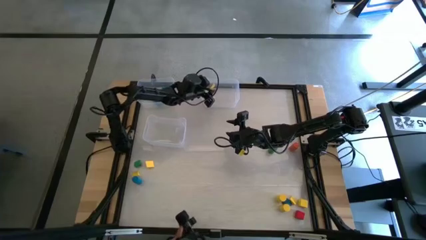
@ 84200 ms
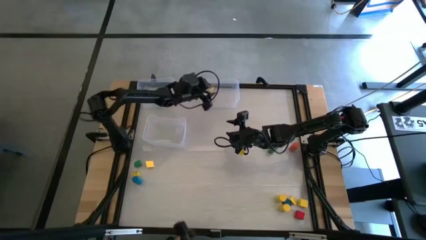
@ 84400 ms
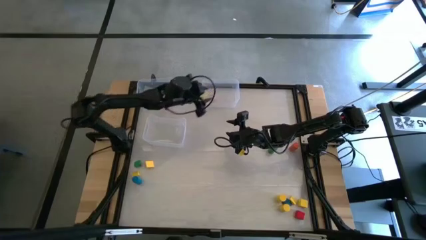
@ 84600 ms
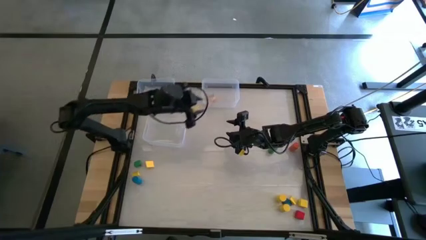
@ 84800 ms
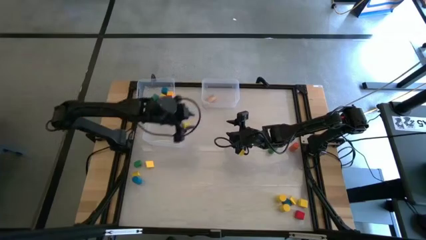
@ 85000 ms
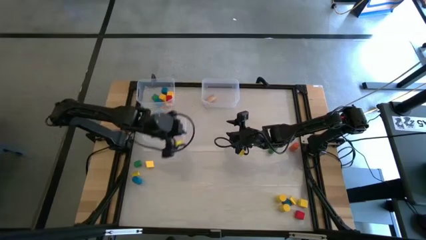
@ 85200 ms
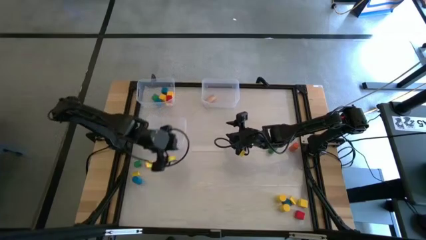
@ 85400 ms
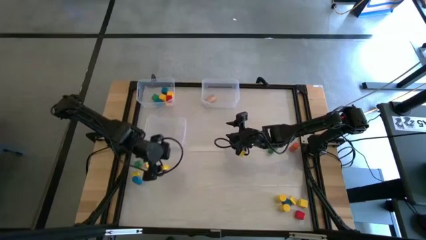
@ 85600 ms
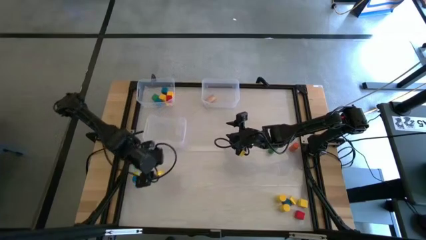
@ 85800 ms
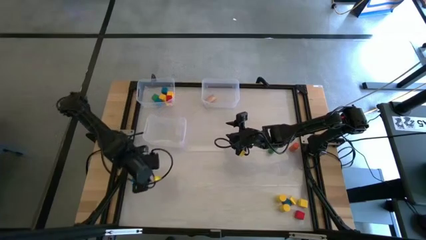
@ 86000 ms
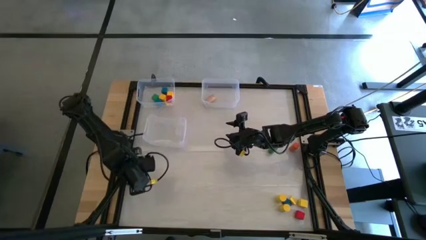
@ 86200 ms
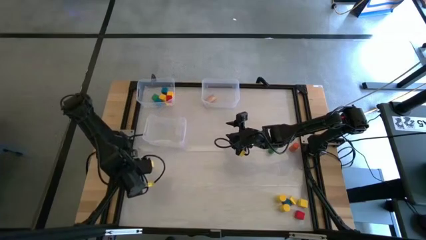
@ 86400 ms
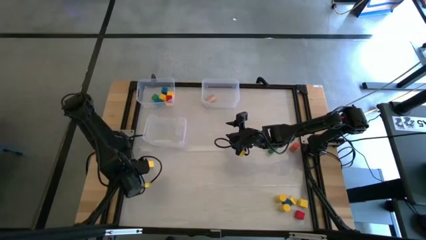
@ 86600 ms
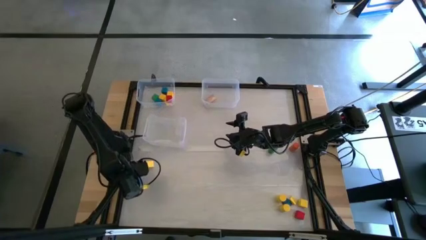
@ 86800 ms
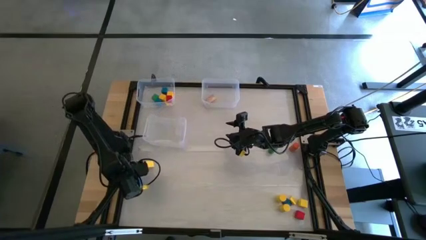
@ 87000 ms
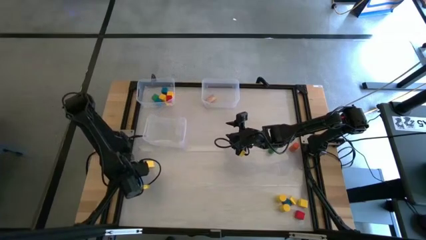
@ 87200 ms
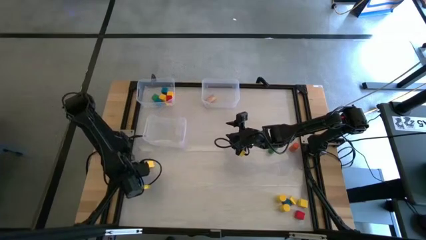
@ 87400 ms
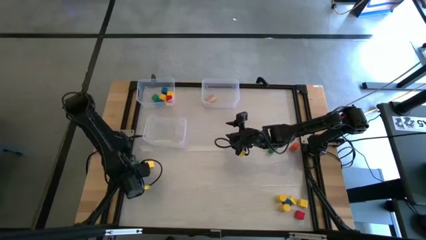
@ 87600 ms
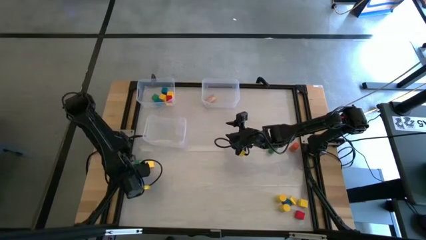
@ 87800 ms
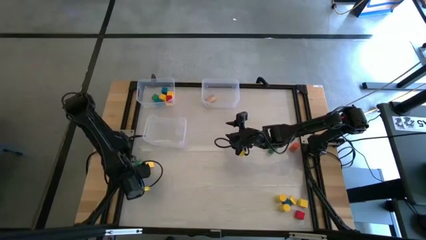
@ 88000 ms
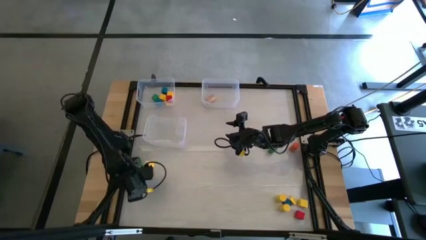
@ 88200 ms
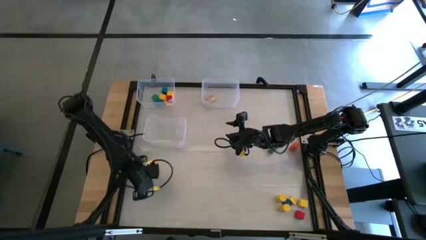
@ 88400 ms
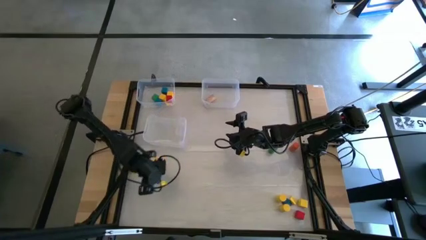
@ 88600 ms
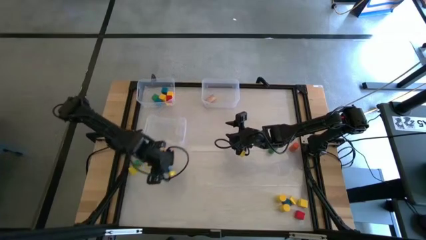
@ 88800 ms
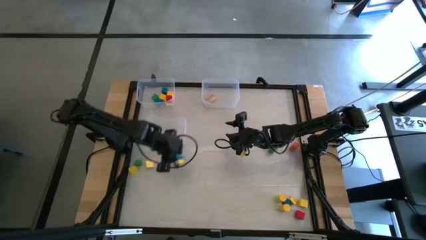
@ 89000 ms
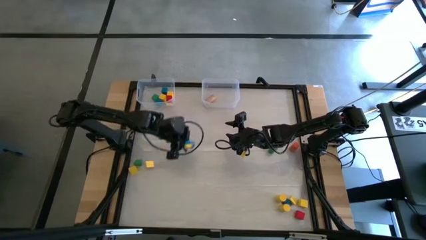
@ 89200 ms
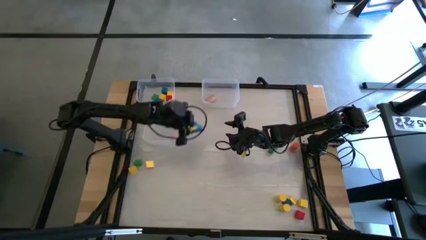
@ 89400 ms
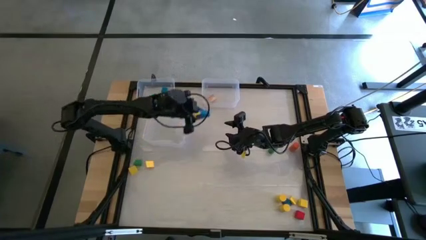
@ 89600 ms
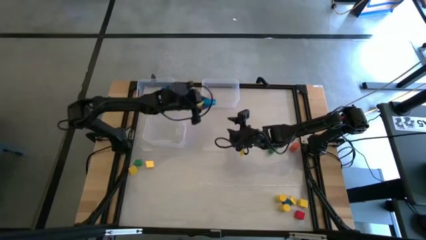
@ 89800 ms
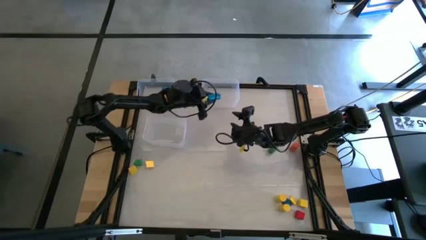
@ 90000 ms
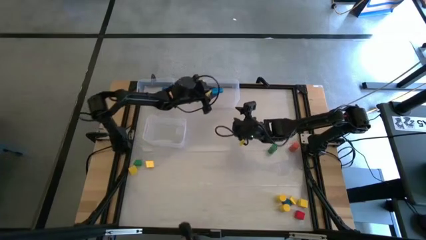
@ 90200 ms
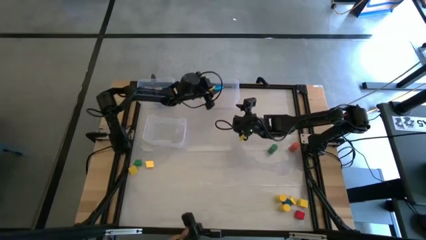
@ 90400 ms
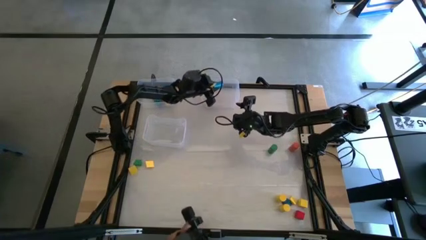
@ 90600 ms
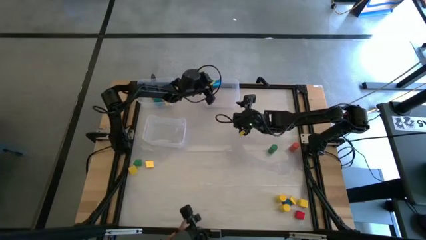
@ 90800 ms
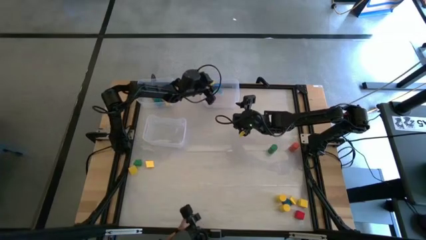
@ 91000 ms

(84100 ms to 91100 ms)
Task: Sort blocks by size
Put the blue cylinder game block into the top middle transparent bin

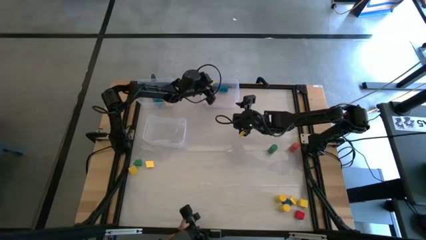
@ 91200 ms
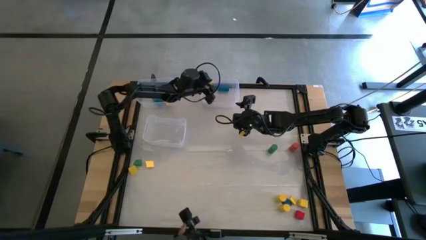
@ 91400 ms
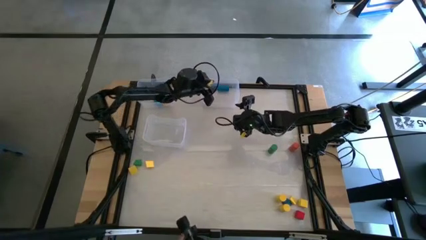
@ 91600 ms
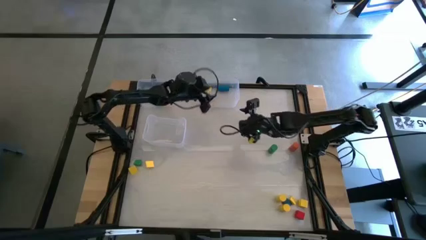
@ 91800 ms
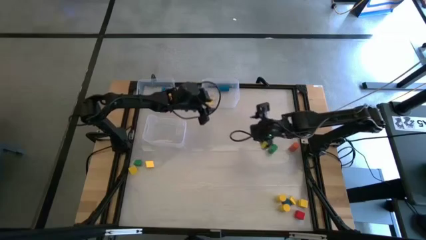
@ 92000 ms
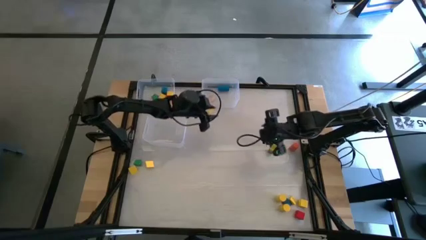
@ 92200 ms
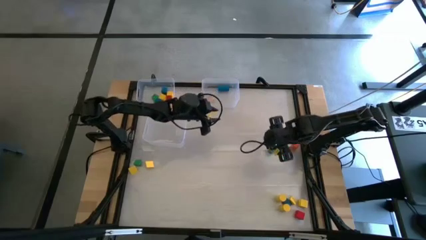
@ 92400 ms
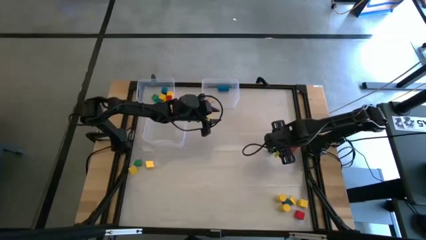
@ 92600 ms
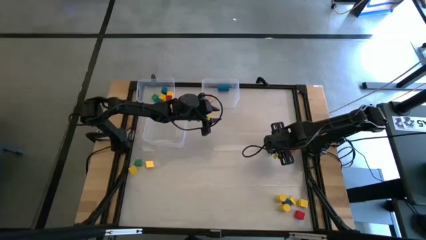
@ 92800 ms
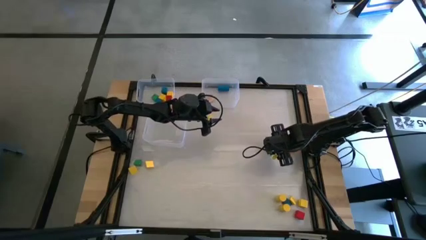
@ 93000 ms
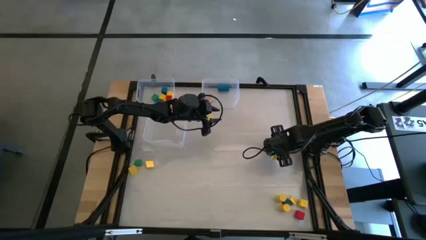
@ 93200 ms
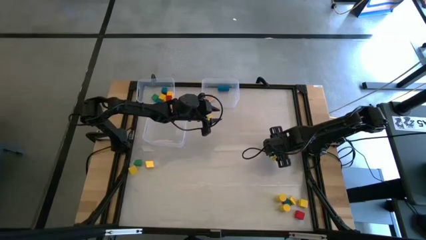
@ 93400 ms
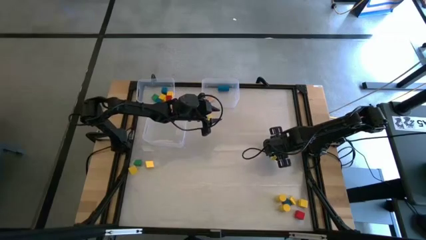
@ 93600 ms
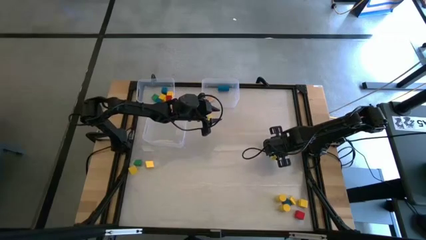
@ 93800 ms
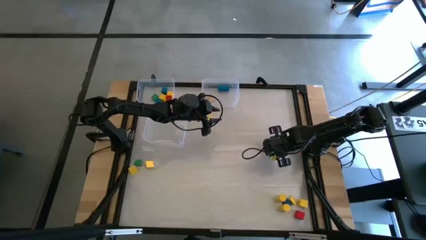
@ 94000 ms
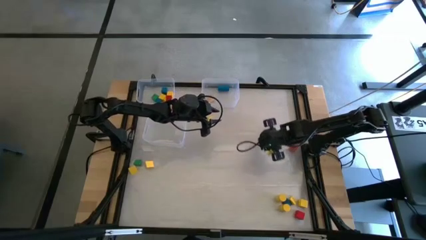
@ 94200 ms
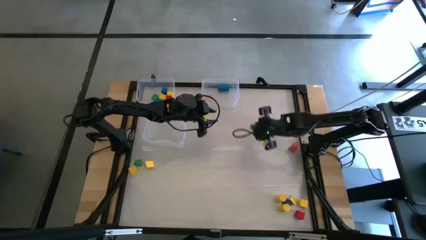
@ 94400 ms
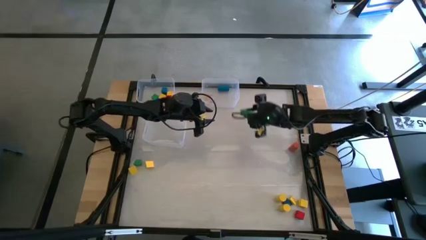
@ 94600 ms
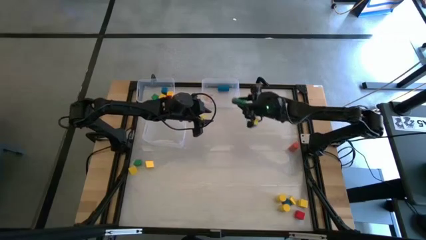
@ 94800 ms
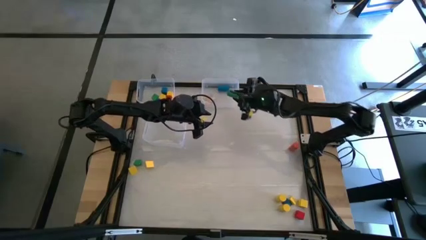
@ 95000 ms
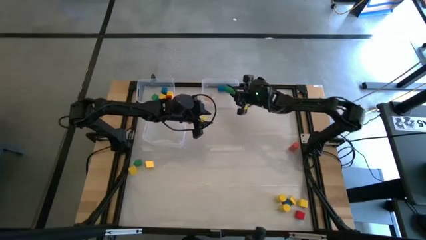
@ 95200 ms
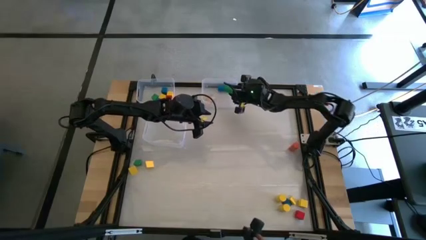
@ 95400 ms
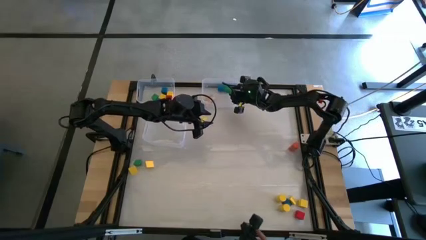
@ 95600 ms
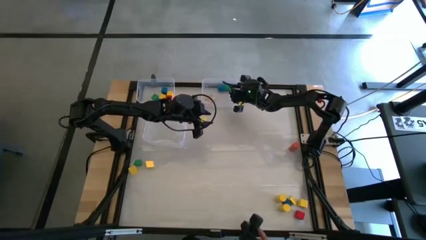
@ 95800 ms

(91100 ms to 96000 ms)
Put the green cylinder game block into the top center transparent bin

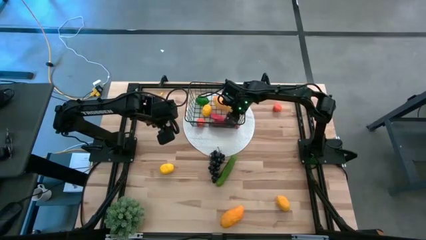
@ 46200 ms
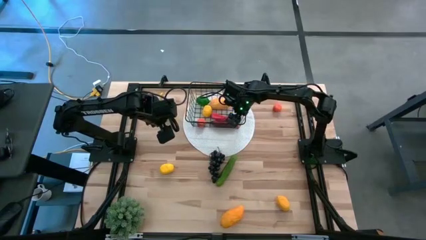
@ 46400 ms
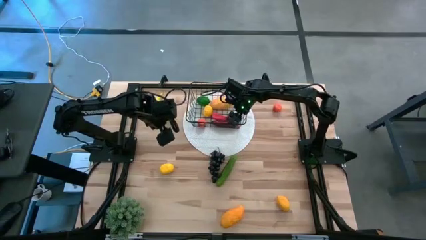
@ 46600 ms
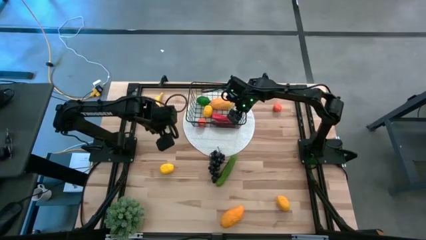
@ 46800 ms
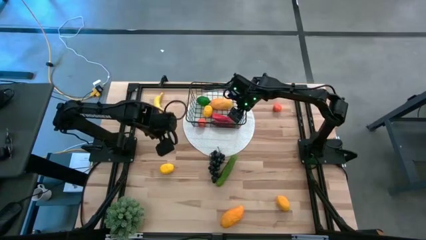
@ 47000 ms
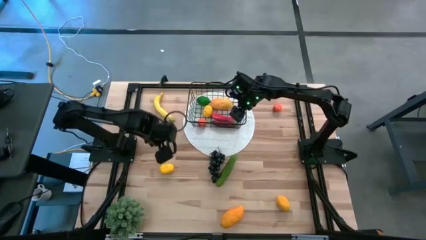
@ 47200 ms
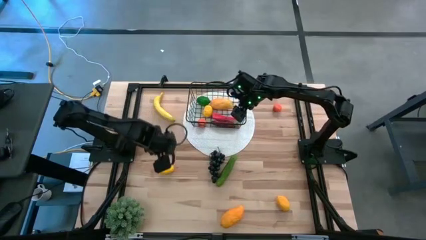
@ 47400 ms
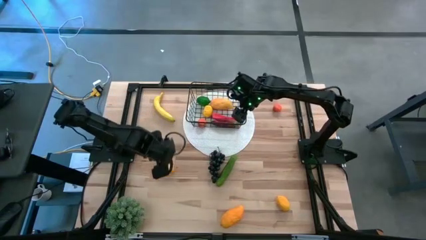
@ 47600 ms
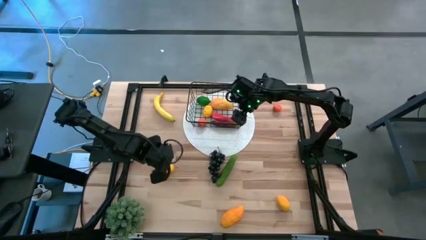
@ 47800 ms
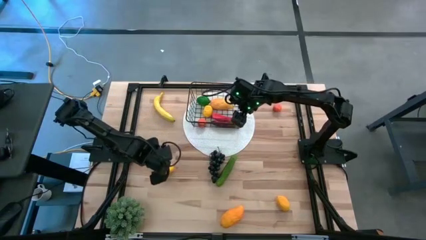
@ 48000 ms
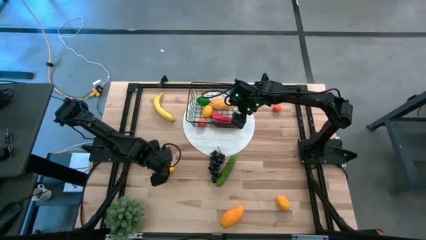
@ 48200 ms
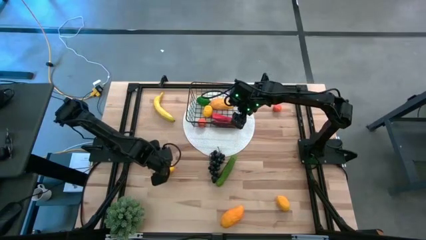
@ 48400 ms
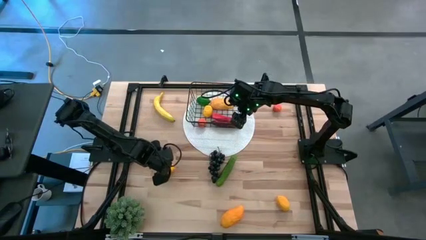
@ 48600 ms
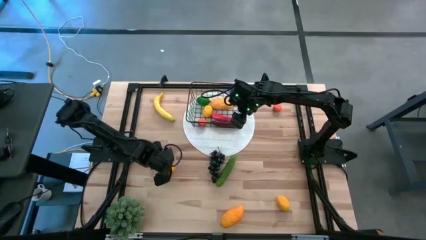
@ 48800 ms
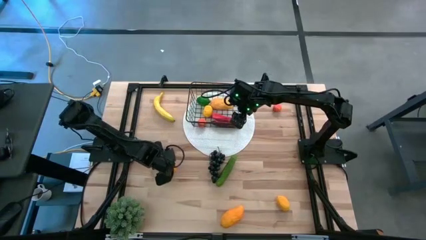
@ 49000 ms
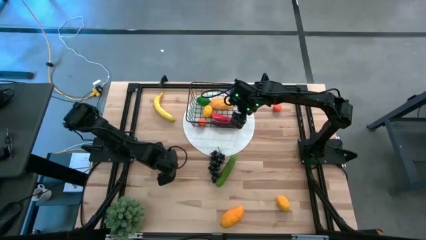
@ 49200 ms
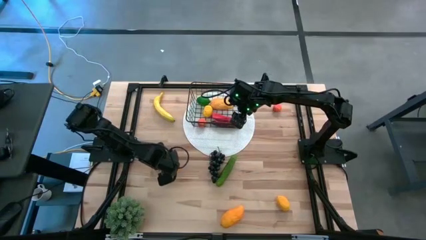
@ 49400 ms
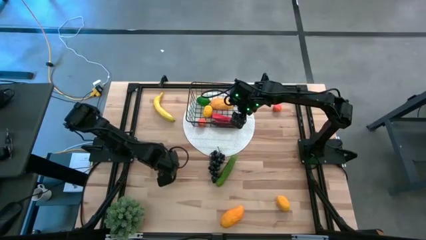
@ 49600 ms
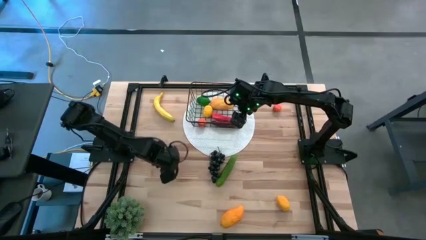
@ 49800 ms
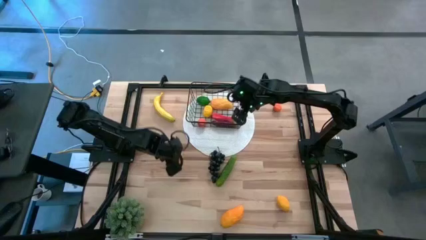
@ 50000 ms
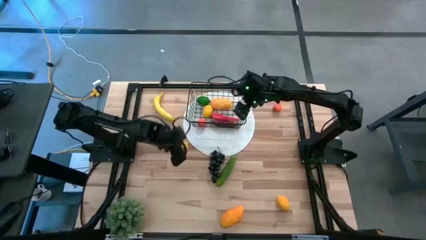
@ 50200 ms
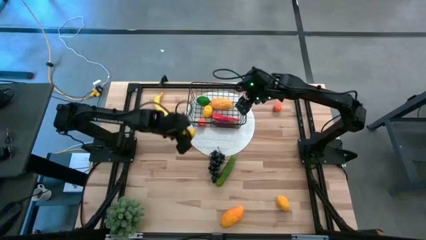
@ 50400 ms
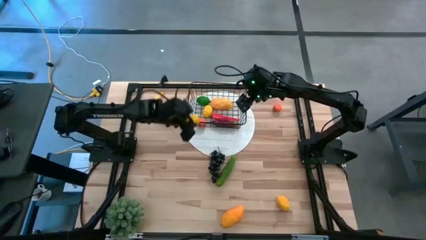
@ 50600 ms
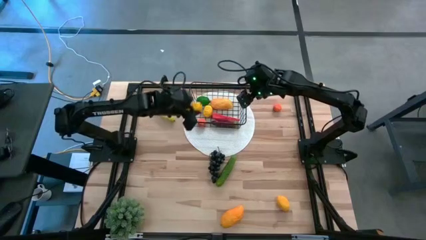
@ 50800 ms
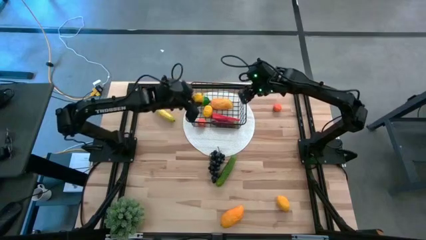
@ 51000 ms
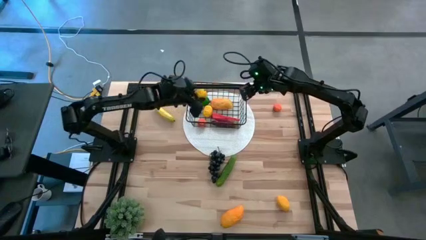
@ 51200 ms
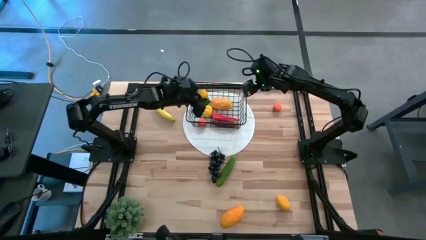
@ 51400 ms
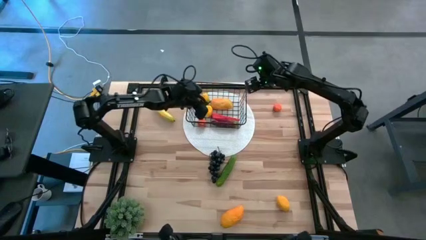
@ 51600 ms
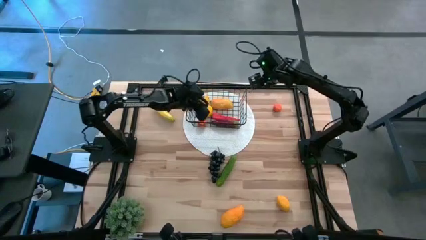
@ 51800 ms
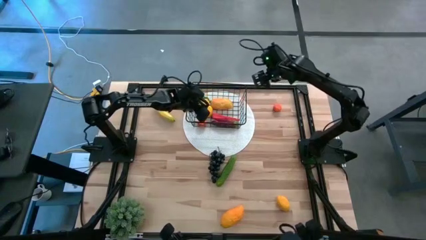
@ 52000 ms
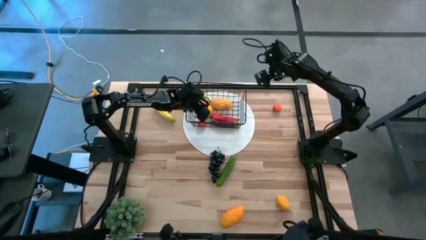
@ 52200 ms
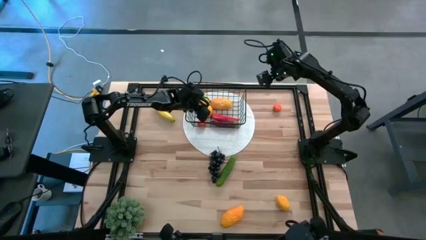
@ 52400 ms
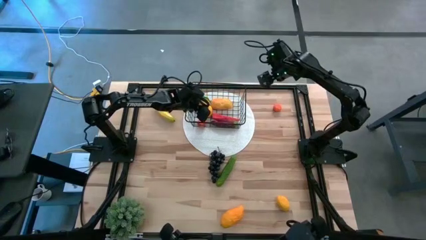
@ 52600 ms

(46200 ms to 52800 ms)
Task: Build produce basket
Put the top yellow lemon into the black wire basket
